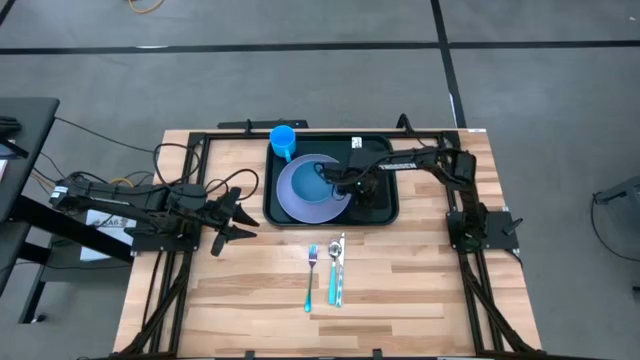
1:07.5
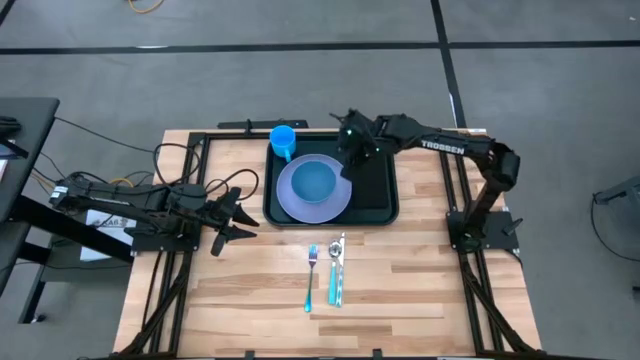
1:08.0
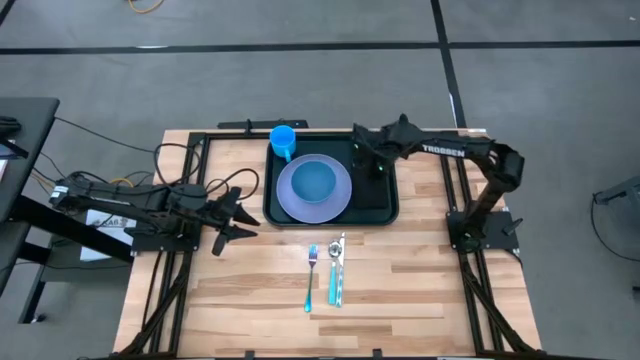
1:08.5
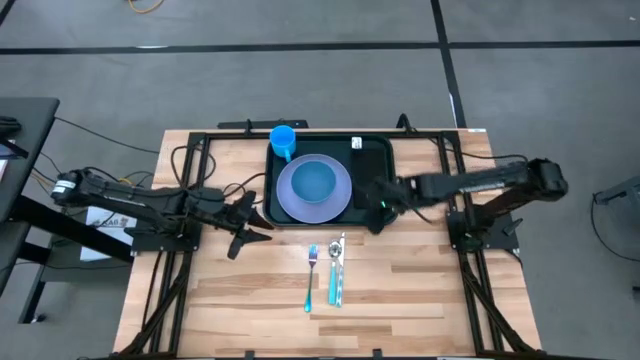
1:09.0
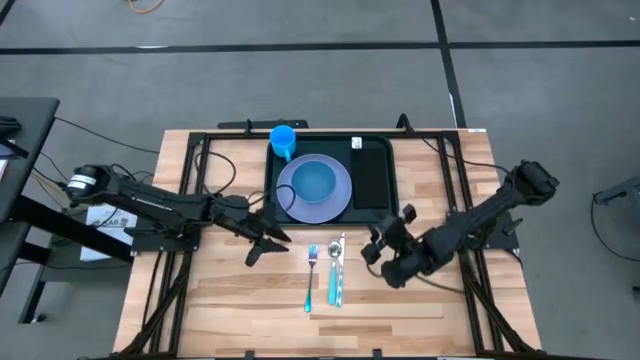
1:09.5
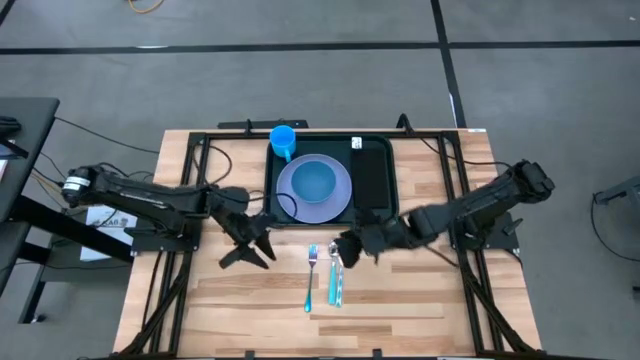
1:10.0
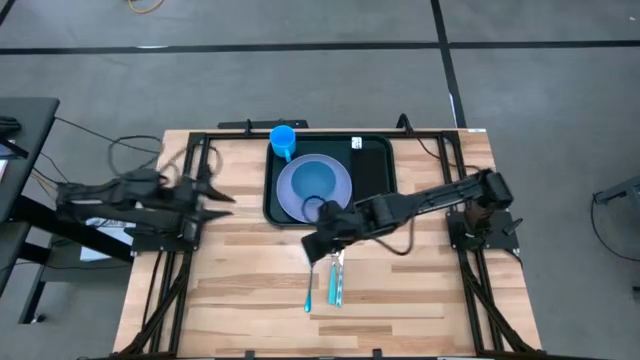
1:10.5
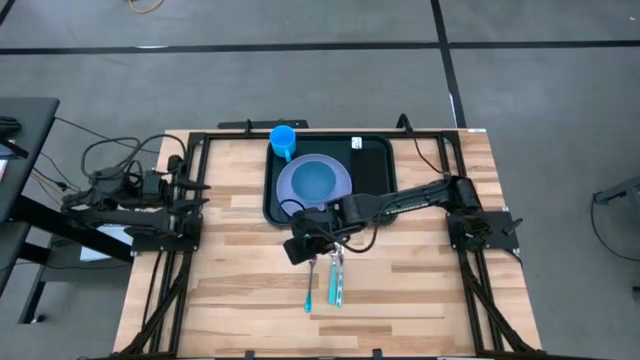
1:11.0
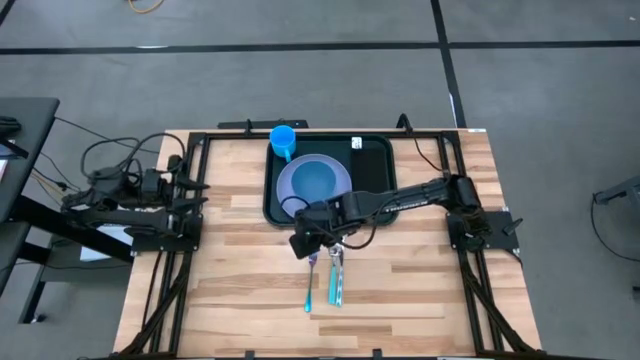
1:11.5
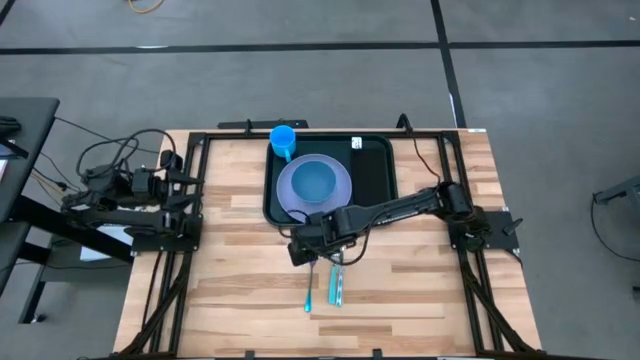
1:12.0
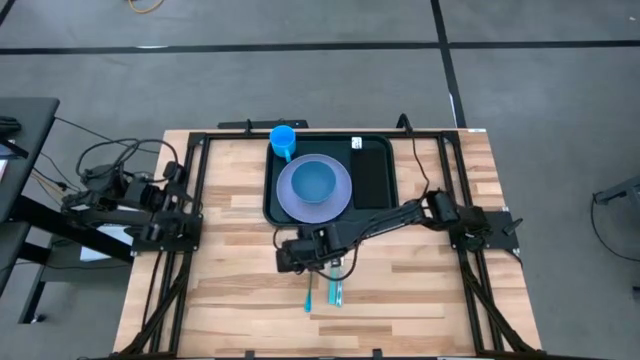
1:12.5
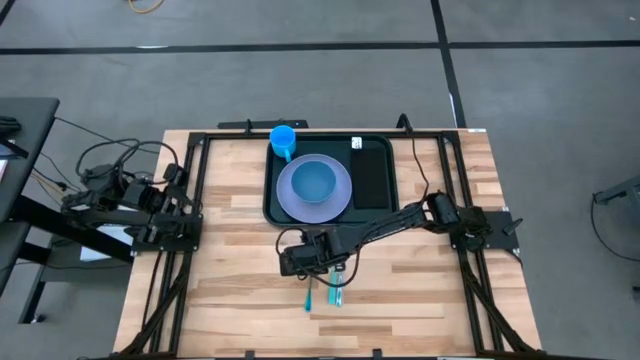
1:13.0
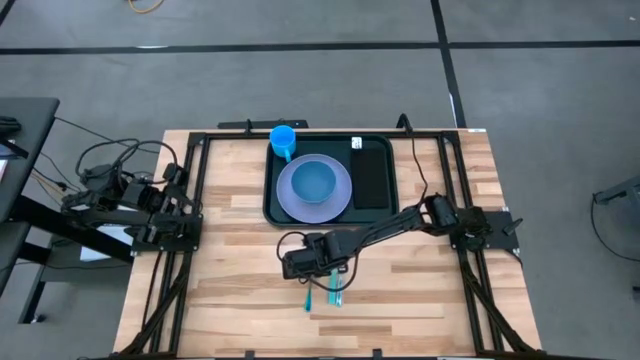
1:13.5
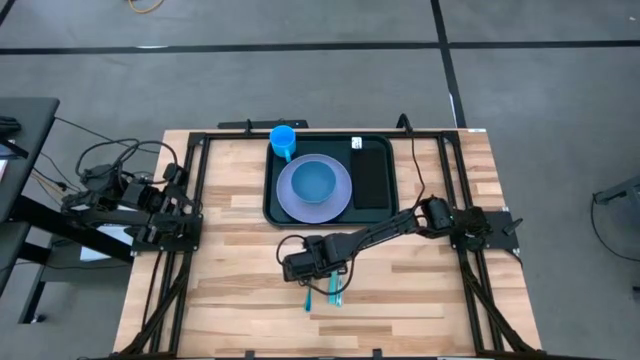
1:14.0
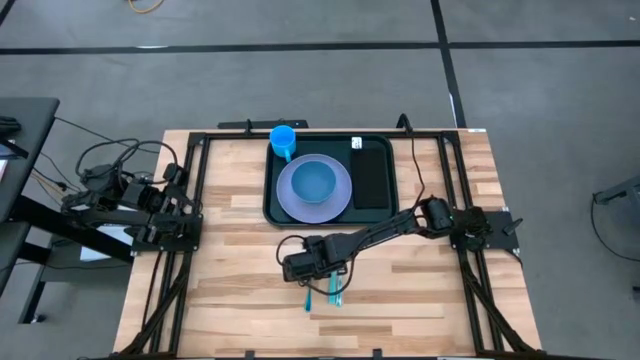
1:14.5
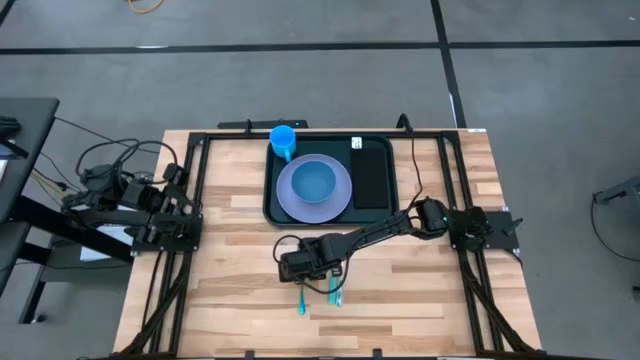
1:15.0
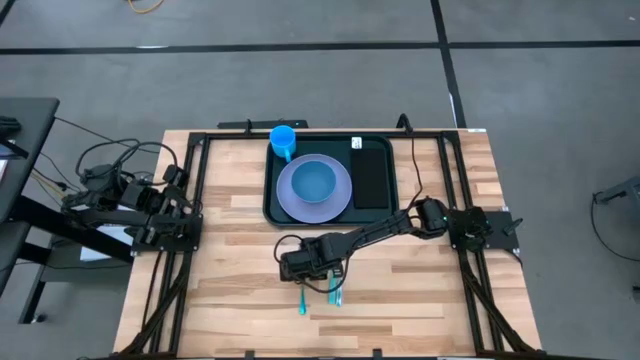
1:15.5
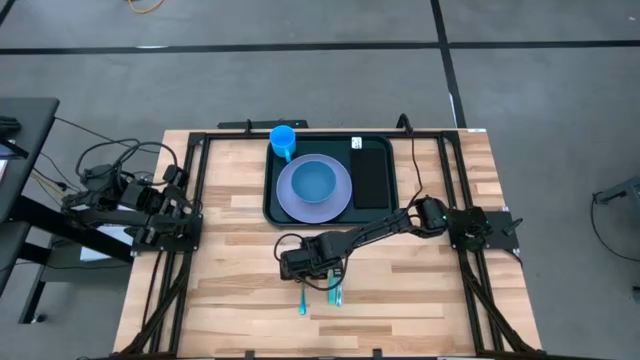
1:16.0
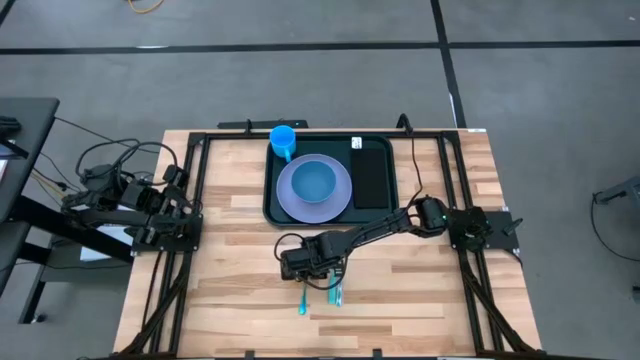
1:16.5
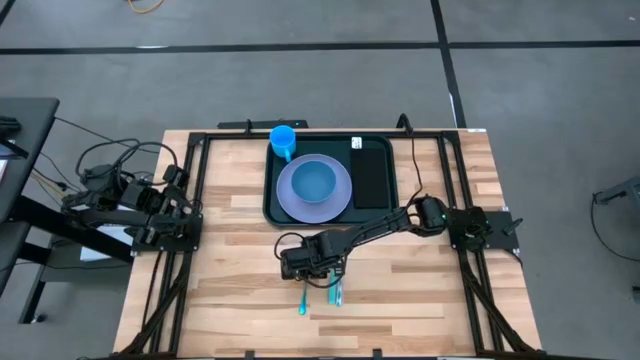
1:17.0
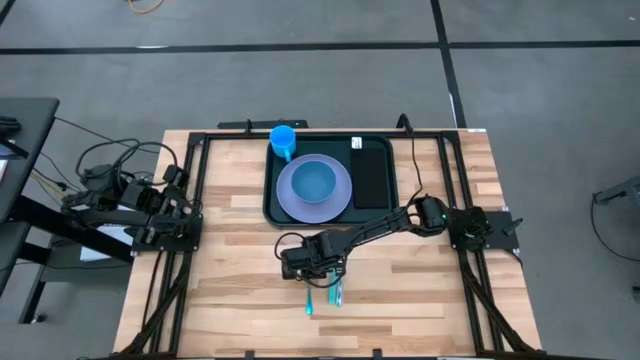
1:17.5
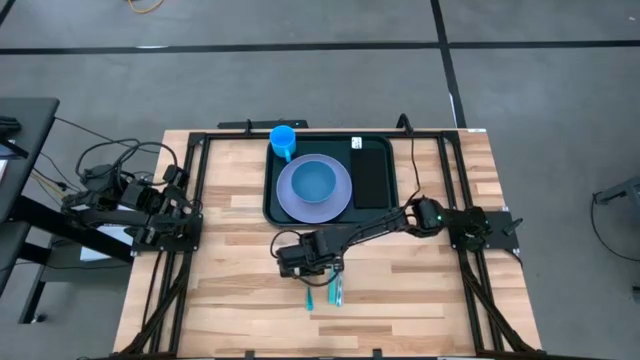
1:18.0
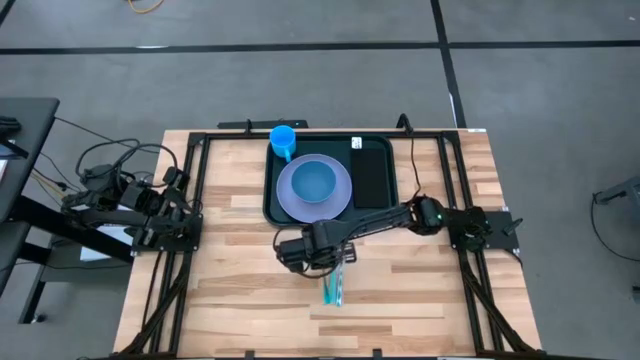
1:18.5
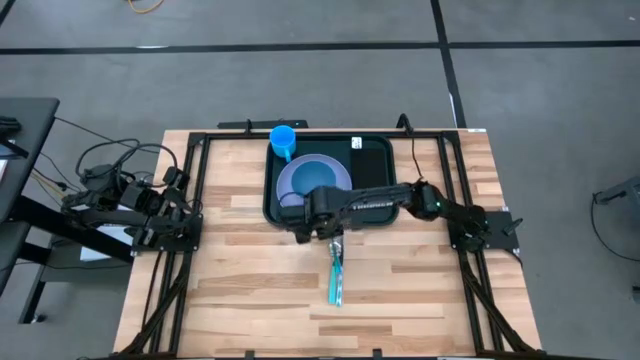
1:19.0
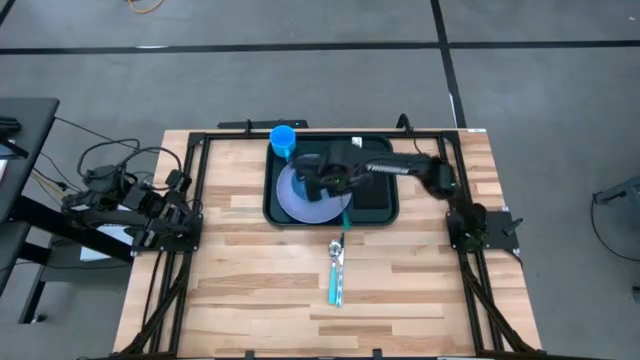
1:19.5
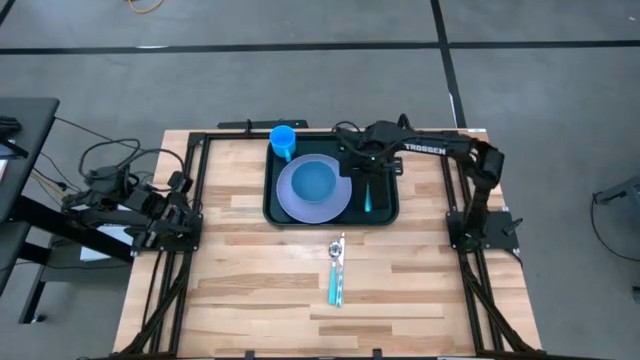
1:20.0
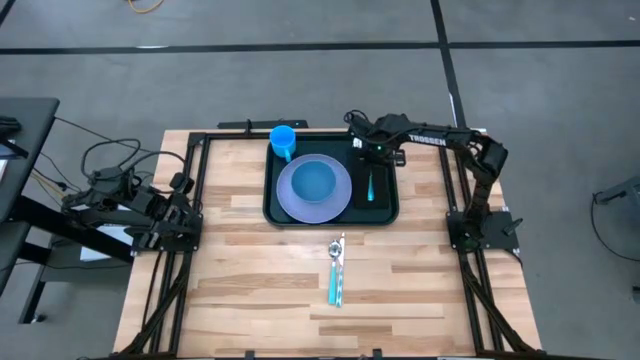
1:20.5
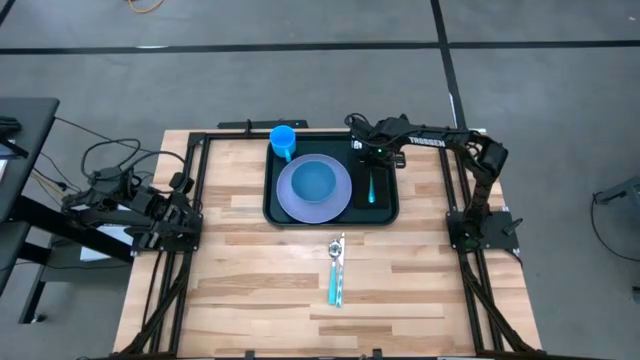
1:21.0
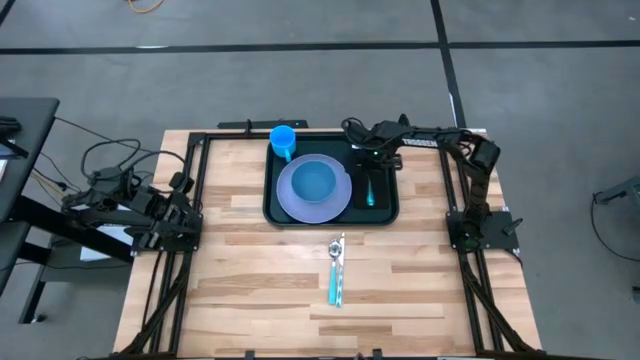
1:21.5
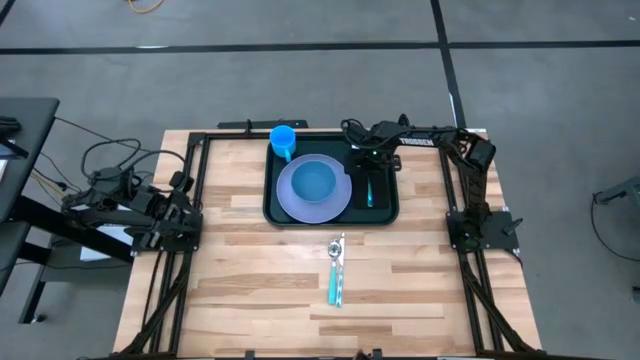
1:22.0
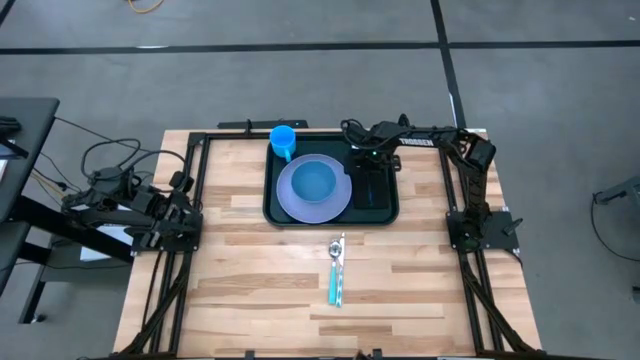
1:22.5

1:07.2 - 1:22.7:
Task: Set up tray
Put the blue fork on the black napkin

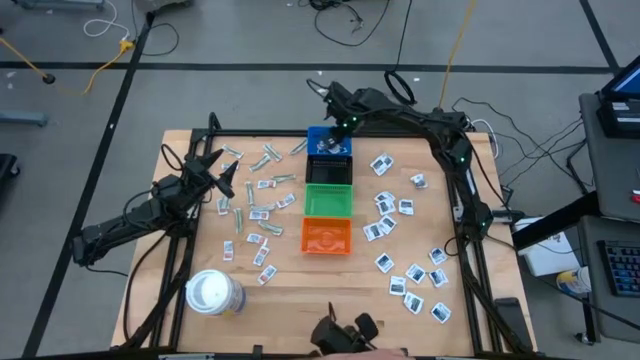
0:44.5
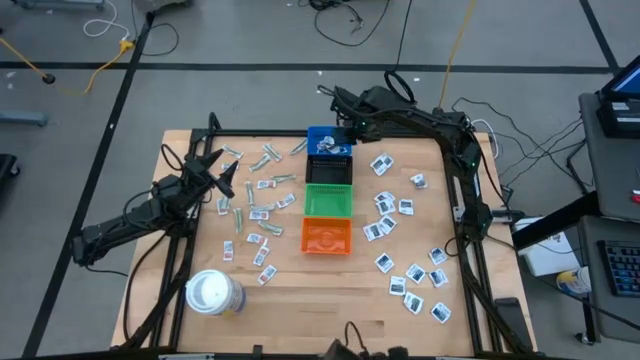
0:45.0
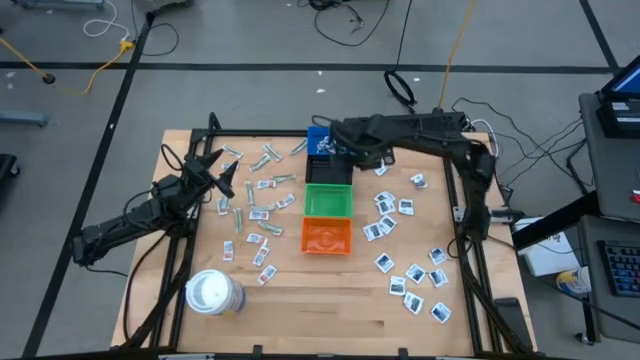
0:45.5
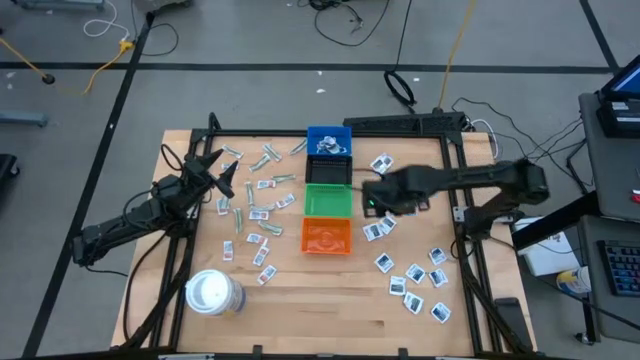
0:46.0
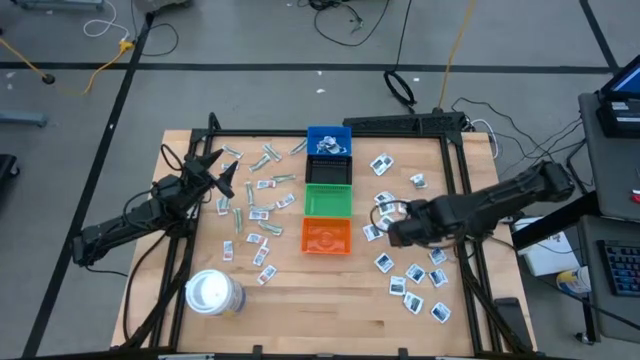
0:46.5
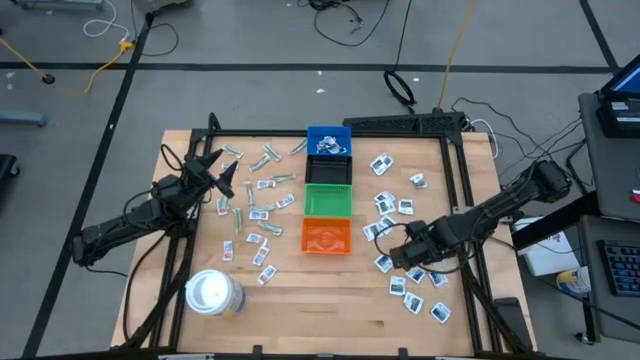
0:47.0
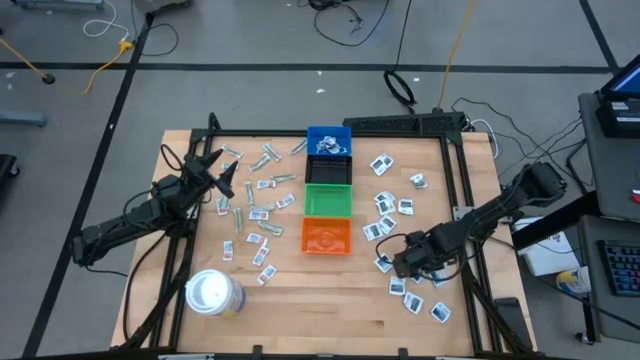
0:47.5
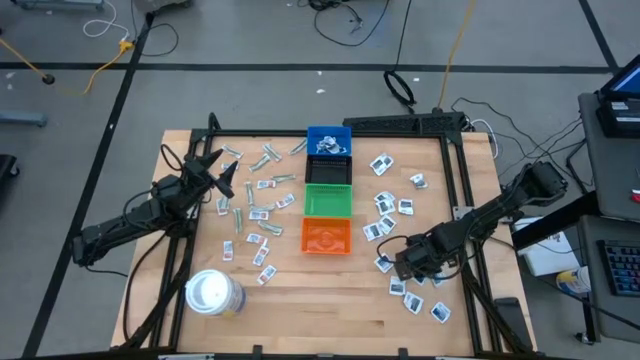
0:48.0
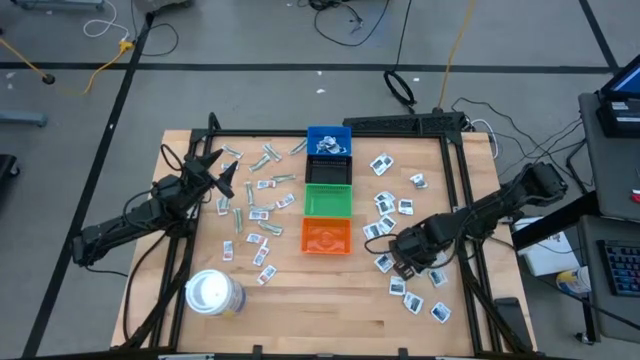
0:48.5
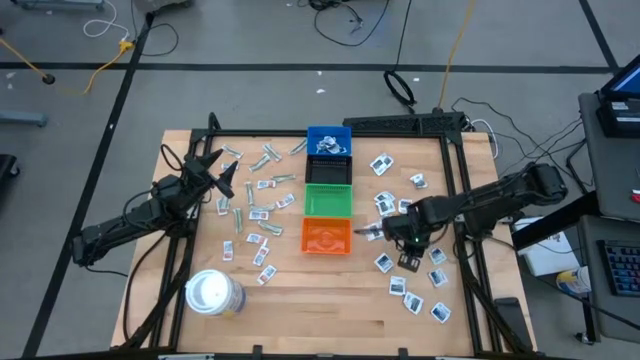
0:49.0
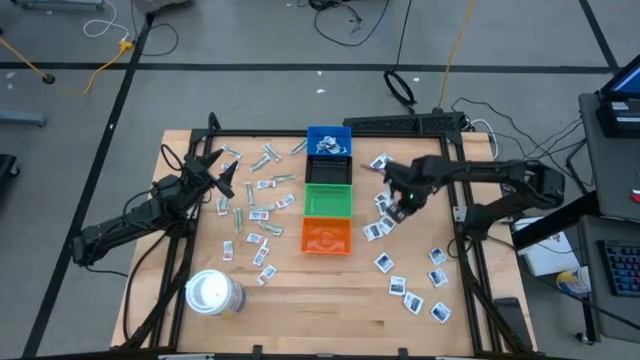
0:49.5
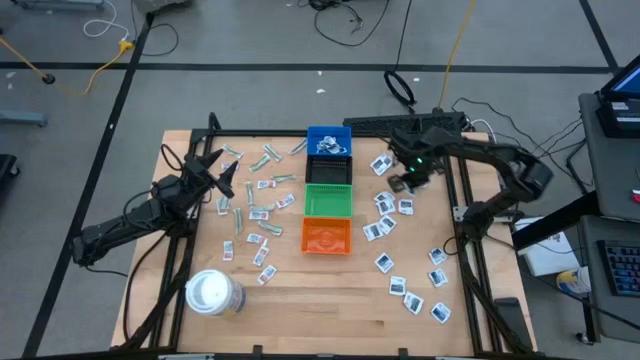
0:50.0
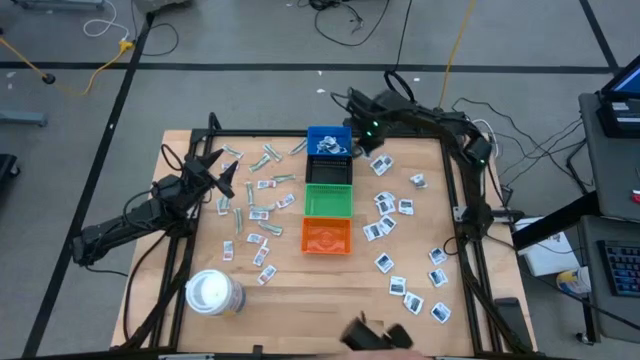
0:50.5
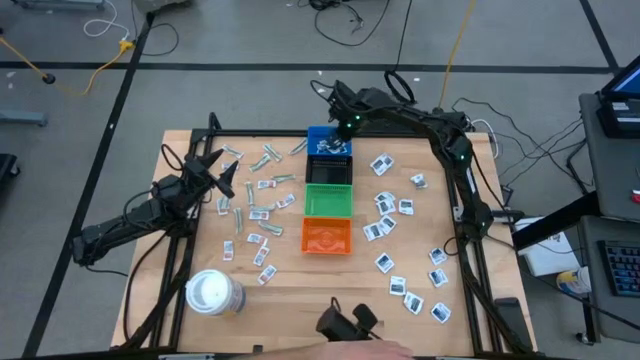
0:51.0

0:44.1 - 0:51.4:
Task: Pick & Place First Aid Supplies
Put the blue alcohol pad into the blue bin
